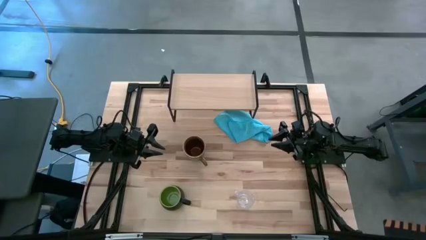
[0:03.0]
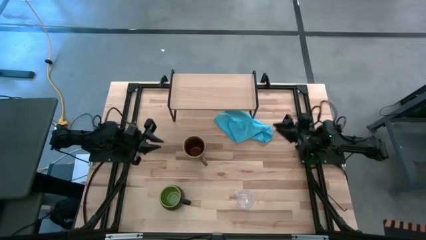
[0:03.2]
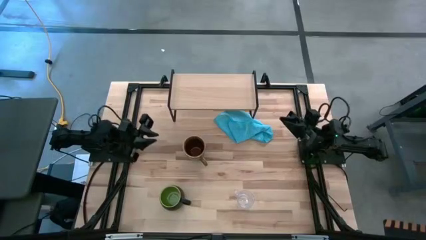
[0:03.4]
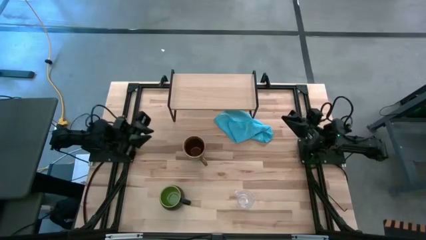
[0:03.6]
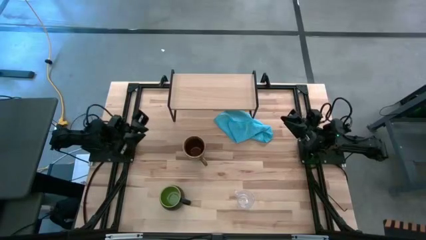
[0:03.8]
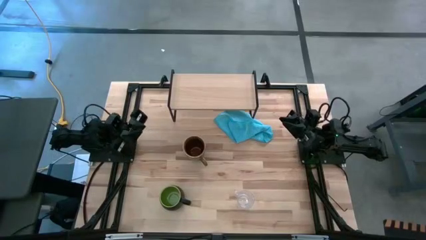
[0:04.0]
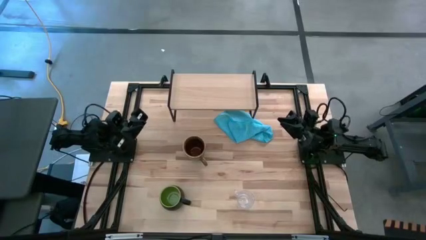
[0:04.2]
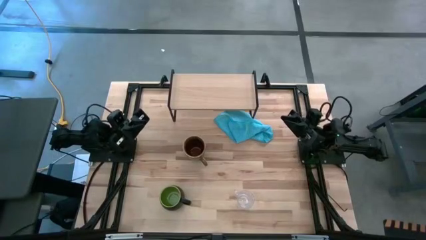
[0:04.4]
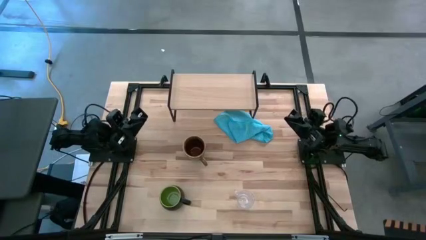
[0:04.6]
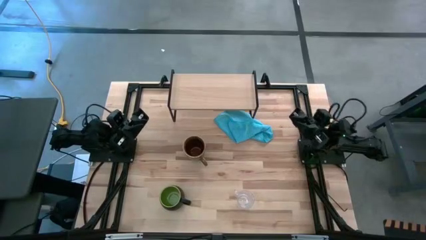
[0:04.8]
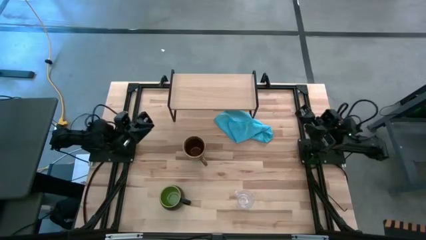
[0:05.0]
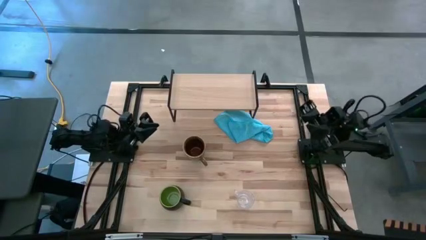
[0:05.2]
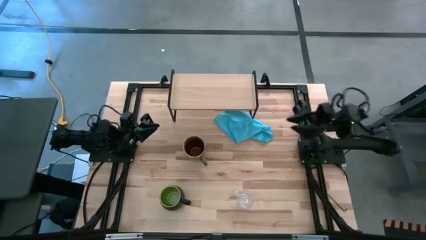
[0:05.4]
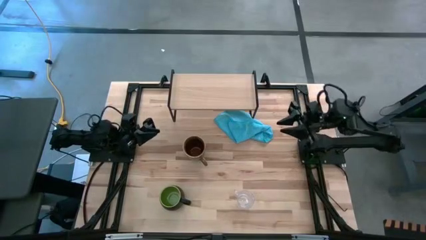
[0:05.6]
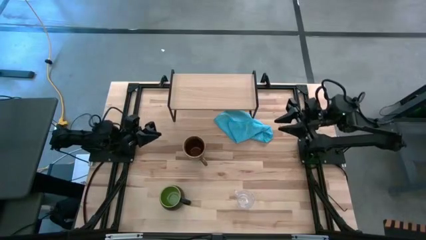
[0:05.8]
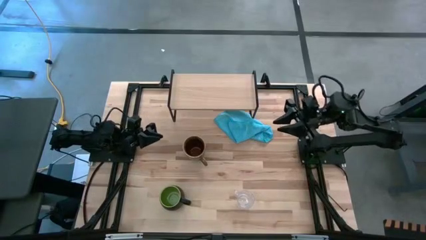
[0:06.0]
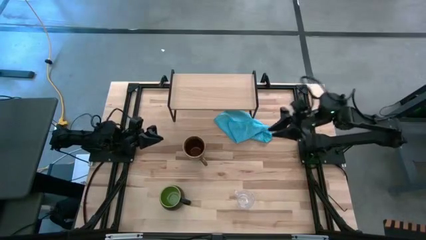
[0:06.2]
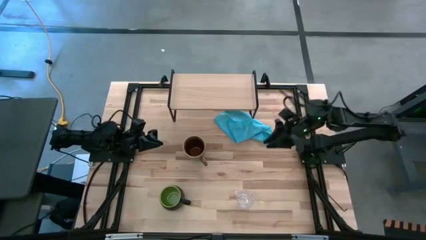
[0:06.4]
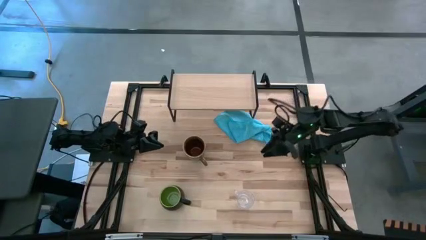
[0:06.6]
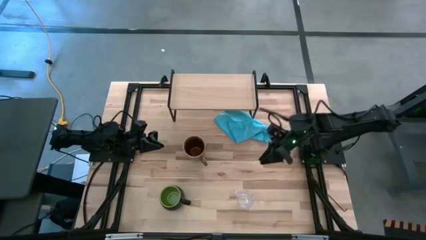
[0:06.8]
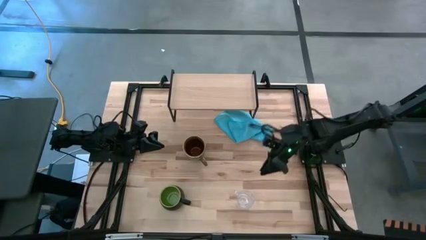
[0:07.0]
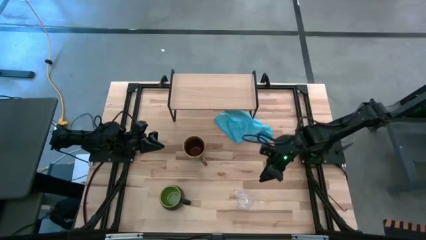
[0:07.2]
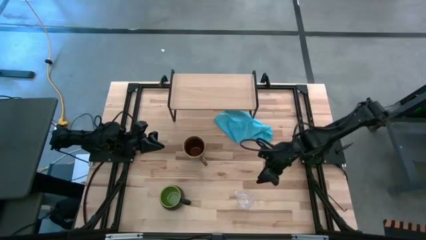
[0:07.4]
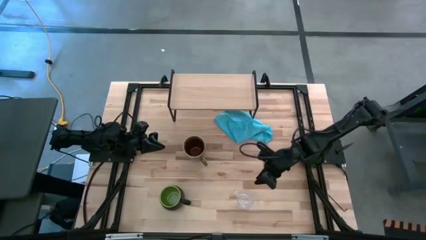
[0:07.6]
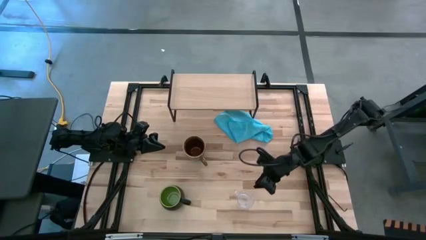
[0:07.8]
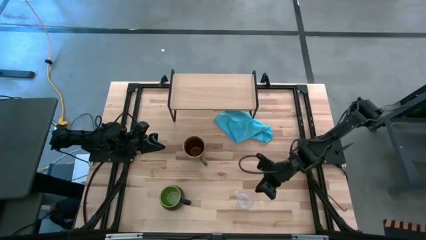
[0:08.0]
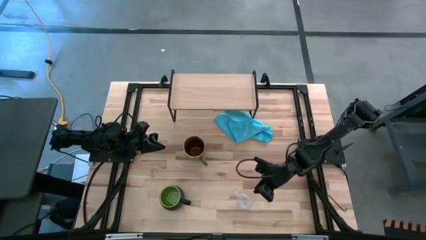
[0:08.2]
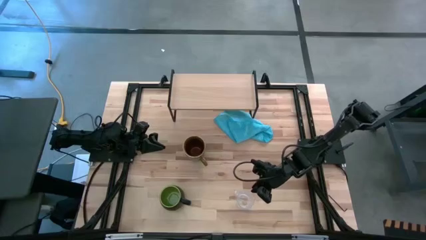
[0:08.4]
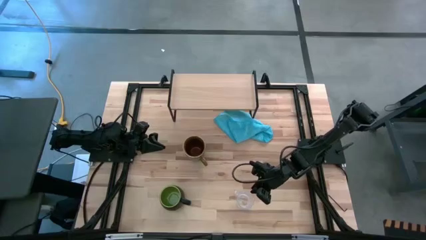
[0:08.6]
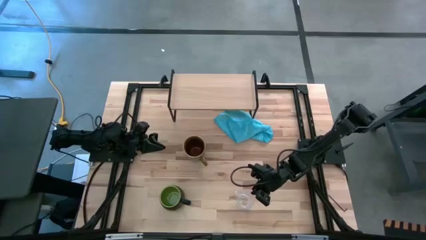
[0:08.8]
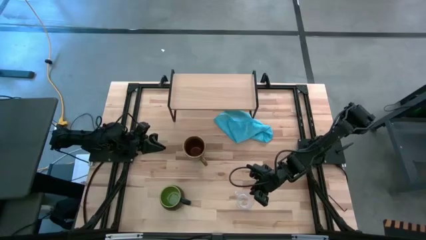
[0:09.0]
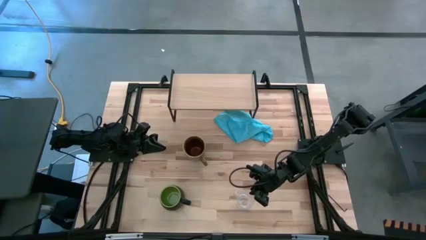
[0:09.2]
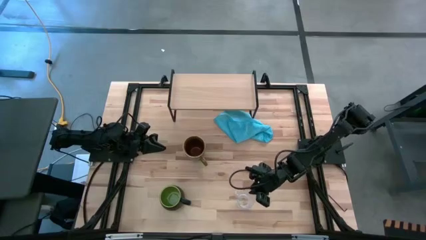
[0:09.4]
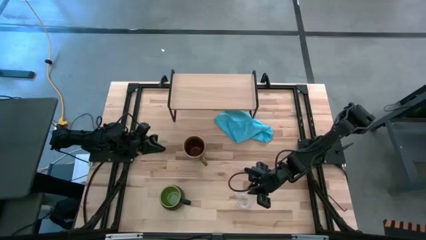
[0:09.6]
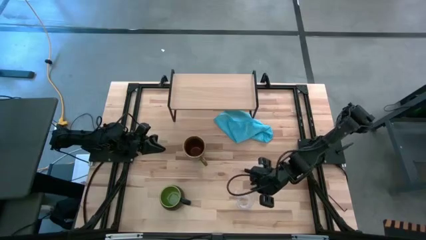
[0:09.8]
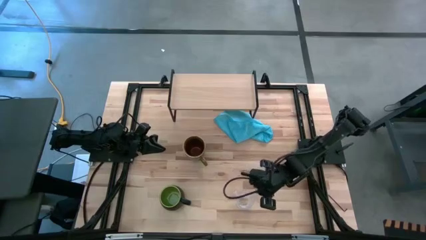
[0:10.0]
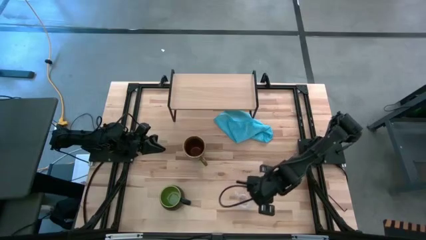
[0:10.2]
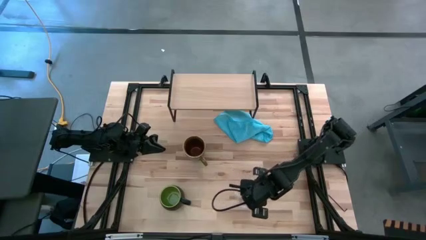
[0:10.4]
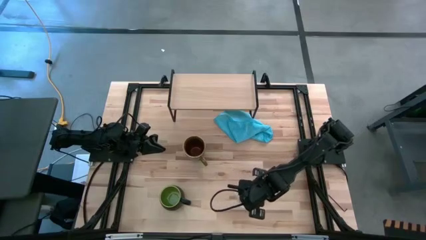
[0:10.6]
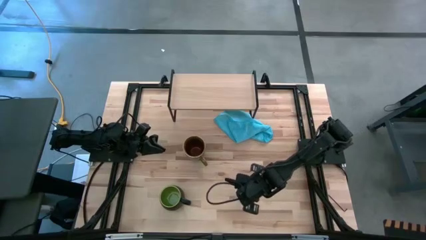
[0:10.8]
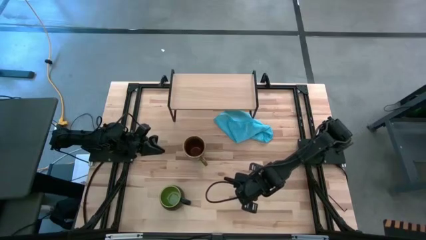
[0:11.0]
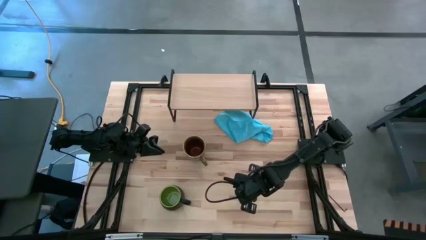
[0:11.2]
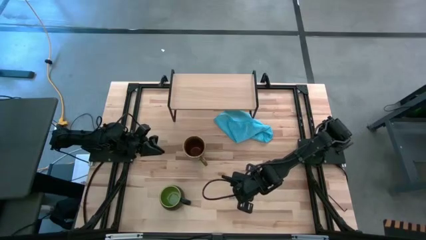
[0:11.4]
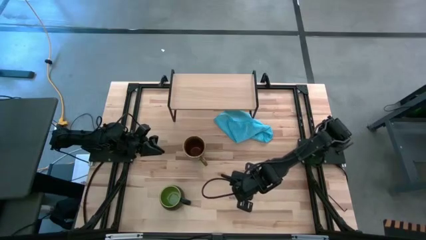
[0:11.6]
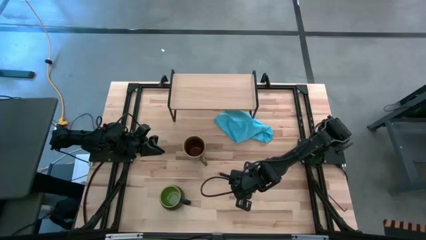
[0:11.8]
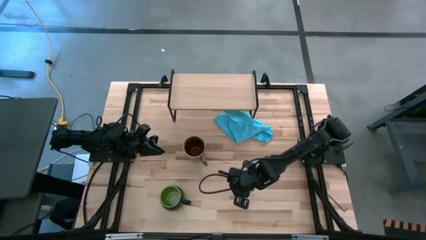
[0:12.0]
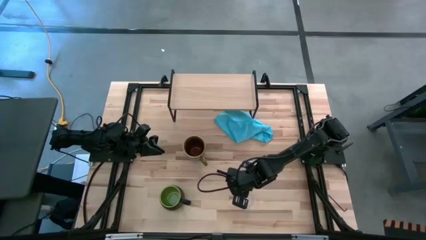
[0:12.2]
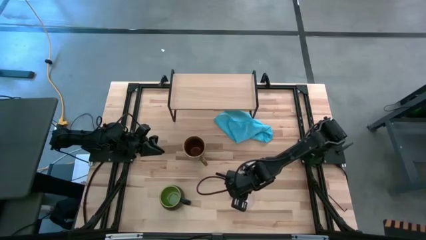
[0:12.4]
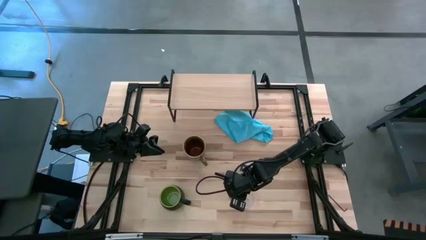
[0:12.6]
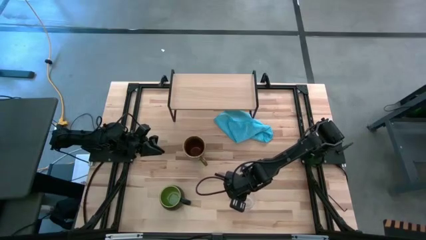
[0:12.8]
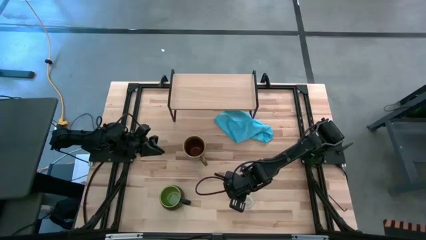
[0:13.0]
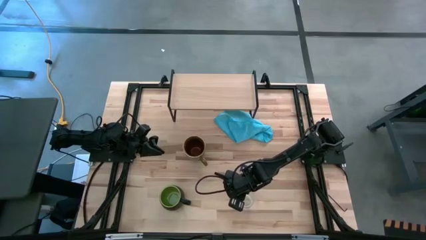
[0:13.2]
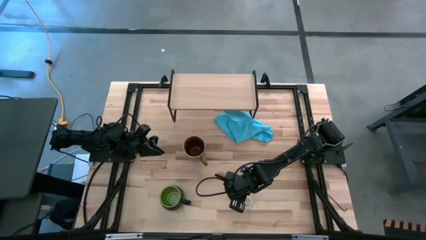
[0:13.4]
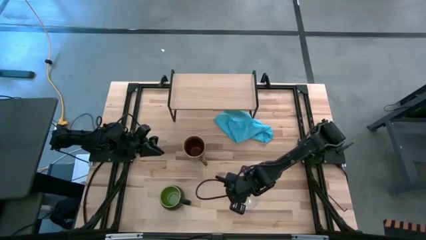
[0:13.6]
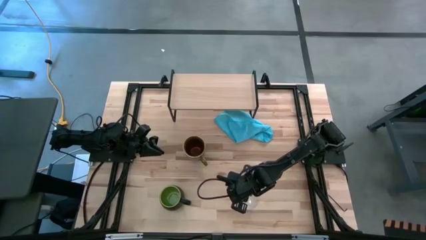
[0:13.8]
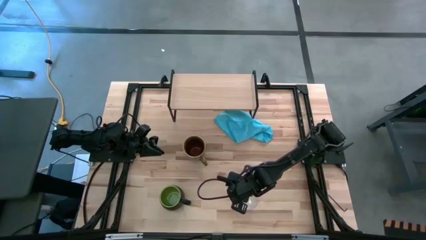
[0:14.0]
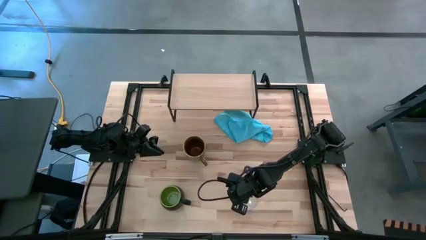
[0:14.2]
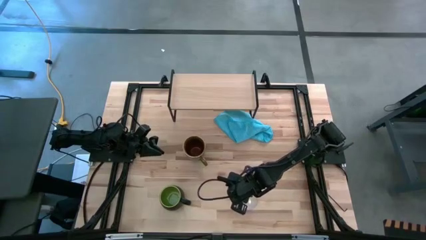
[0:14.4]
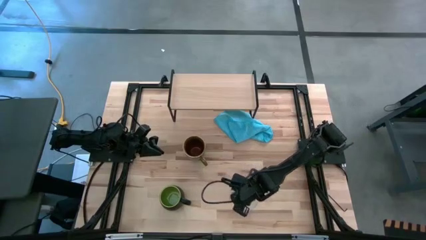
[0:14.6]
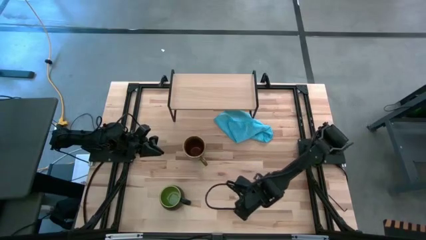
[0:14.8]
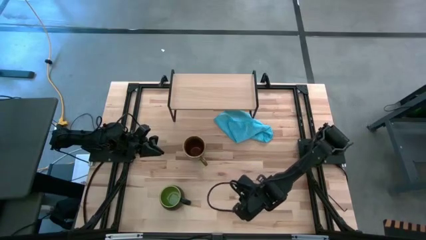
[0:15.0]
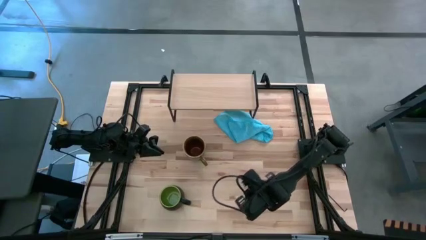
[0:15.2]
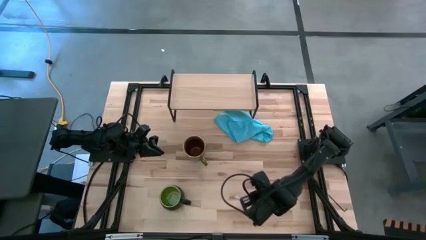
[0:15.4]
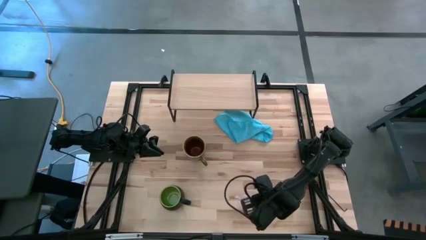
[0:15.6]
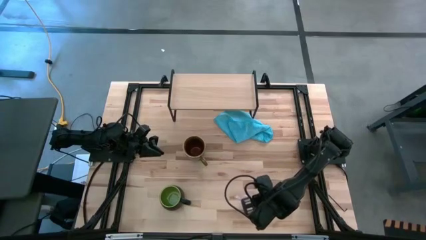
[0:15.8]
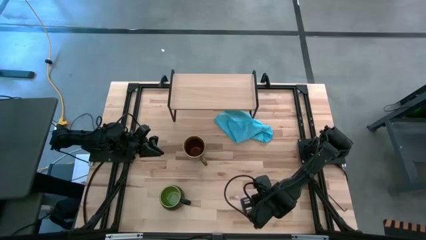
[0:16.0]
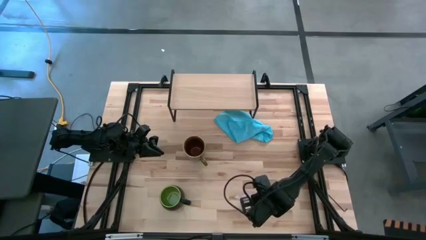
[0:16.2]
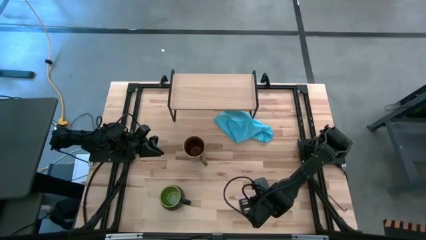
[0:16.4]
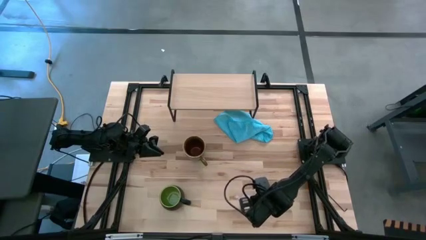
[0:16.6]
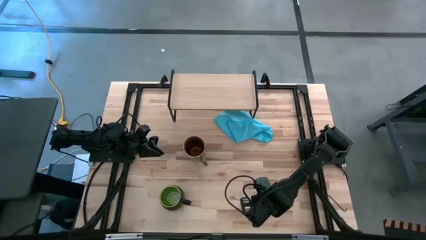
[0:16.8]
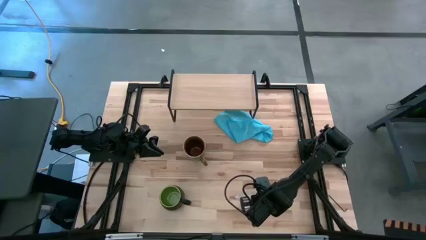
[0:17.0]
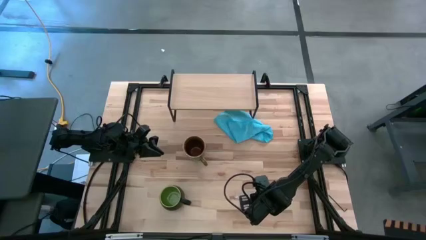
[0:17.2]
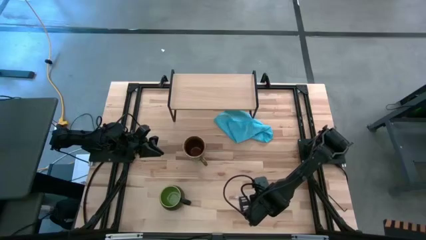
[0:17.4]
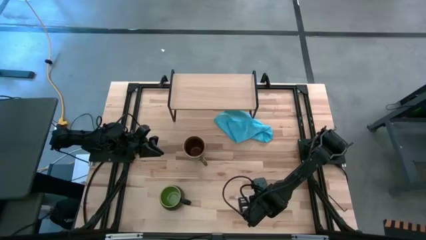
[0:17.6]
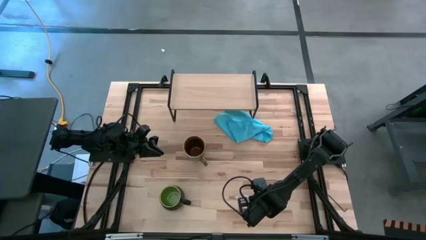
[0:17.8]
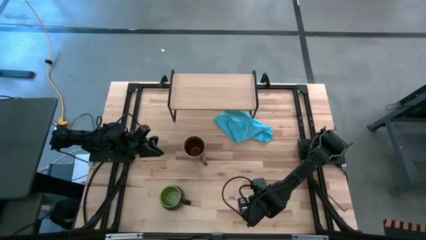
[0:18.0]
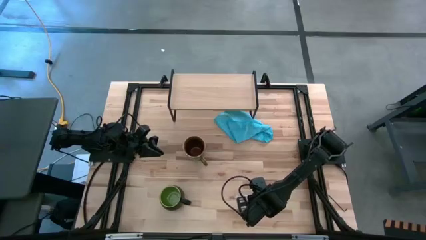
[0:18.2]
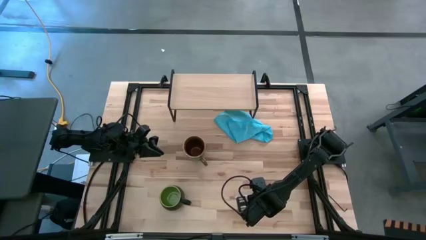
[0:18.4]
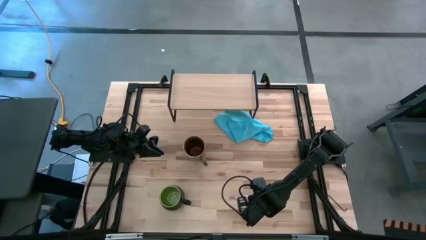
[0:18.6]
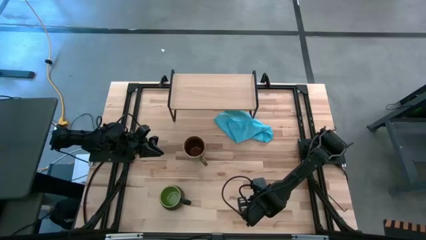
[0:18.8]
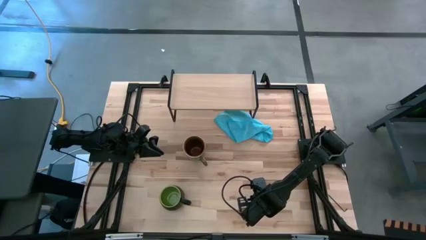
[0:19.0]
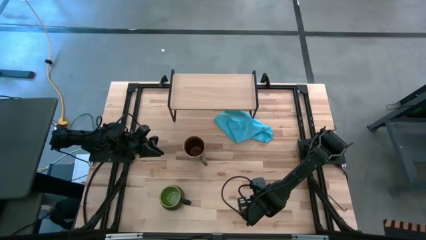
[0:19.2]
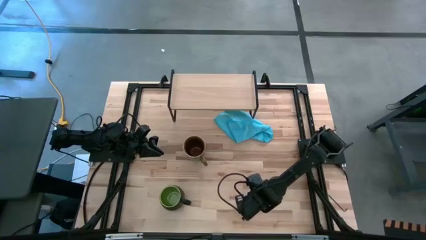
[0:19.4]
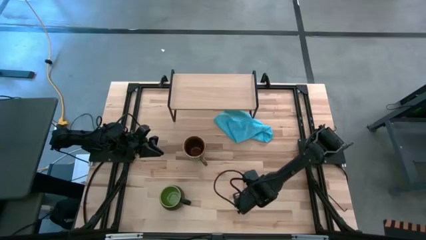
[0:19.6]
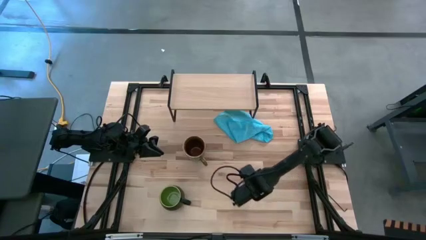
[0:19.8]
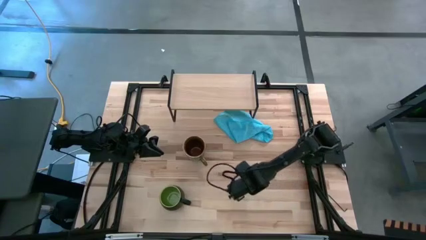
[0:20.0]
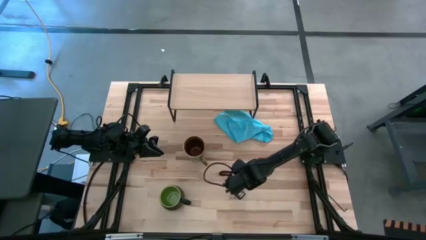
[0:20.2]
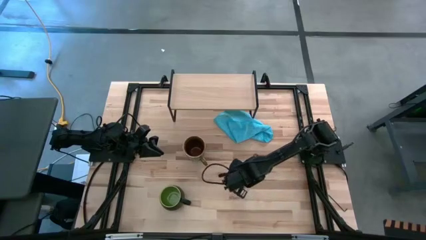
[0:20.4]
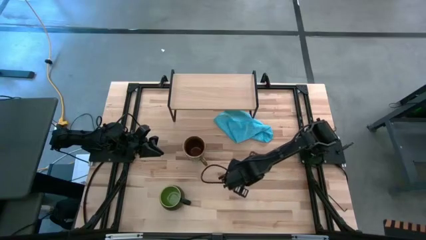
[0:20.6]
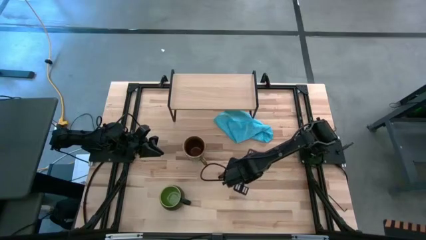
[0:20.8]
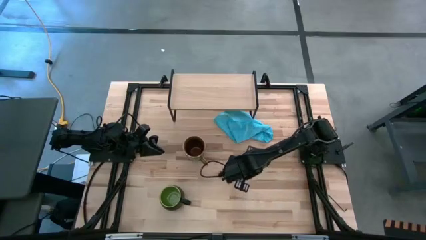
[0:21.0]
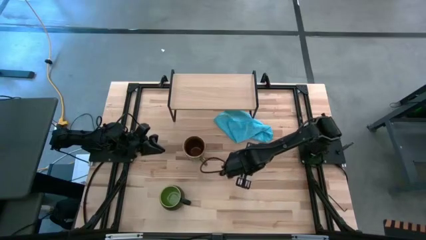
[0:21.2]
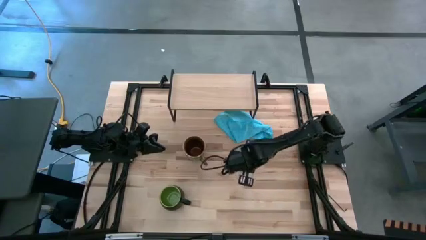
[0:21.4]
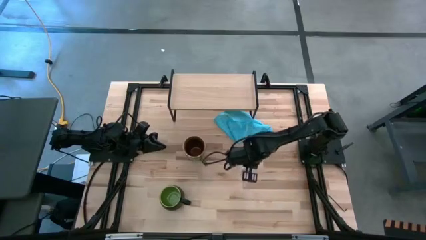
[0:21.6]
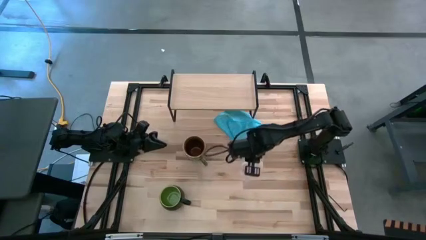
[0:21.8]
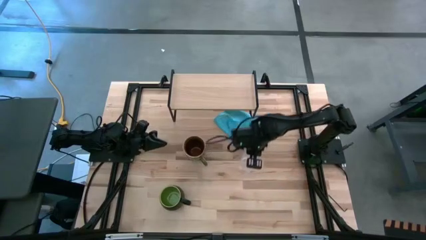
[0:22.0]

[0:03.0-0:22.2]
Task: Stack small to large cups/mugs on shelf
Put the transparent mug on the shelf
